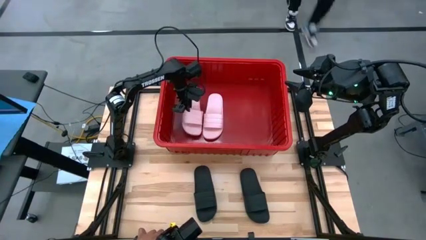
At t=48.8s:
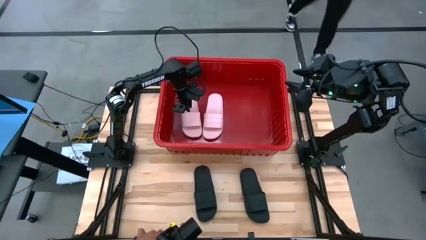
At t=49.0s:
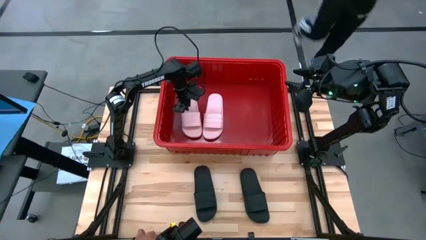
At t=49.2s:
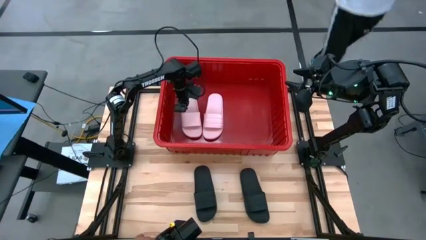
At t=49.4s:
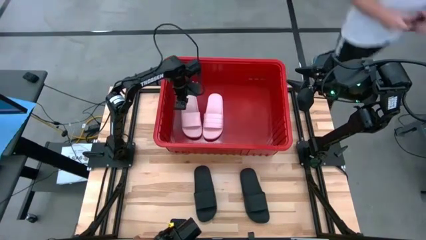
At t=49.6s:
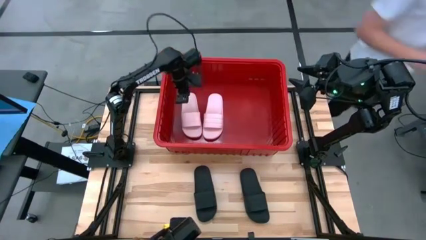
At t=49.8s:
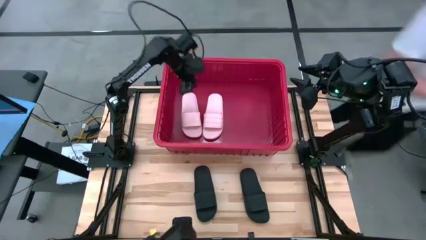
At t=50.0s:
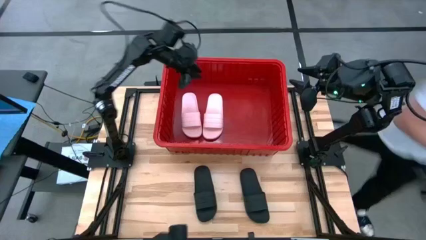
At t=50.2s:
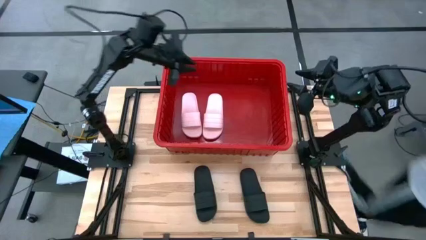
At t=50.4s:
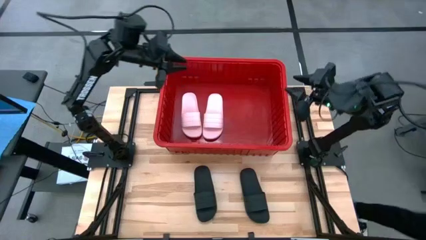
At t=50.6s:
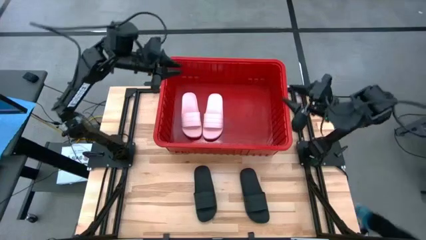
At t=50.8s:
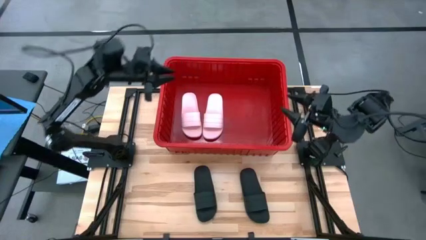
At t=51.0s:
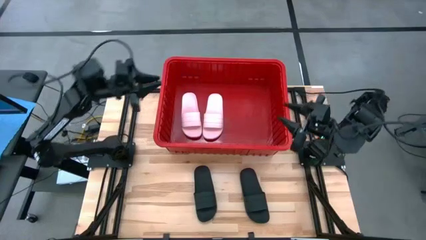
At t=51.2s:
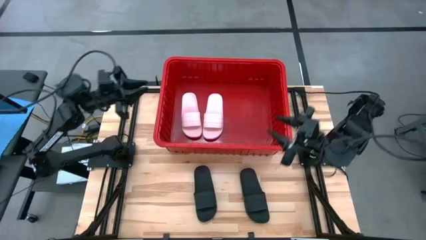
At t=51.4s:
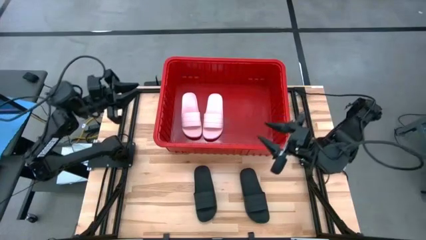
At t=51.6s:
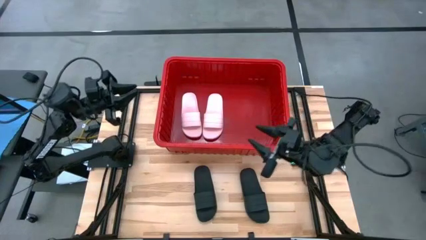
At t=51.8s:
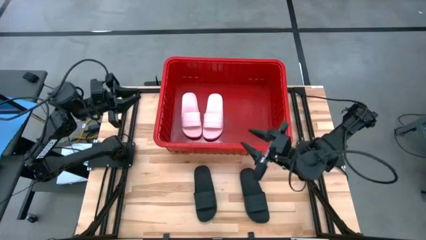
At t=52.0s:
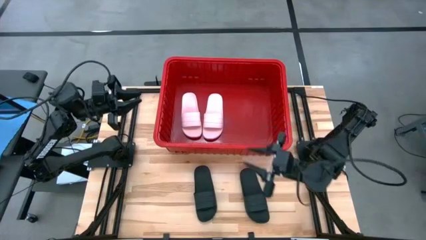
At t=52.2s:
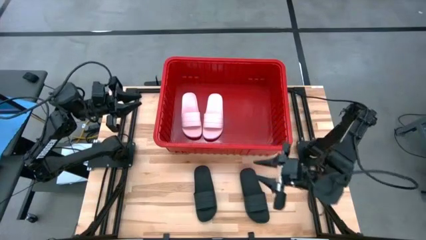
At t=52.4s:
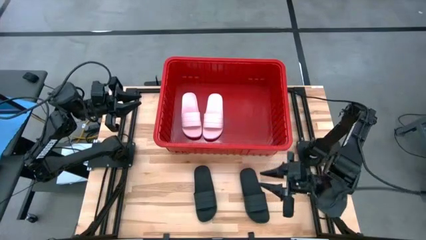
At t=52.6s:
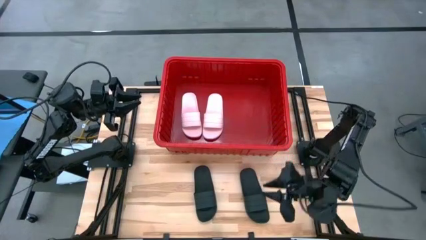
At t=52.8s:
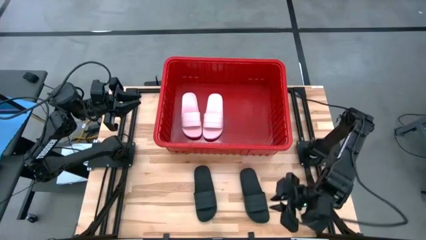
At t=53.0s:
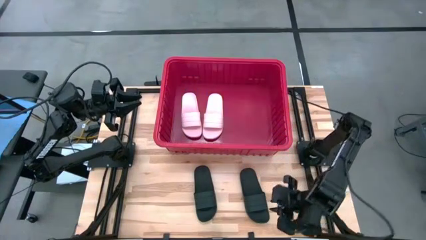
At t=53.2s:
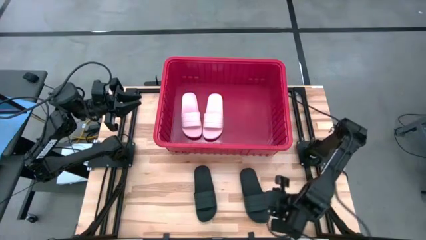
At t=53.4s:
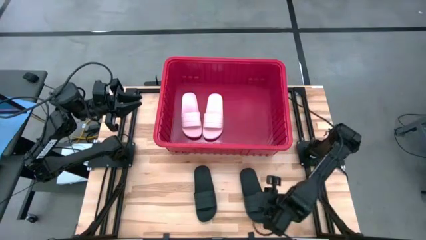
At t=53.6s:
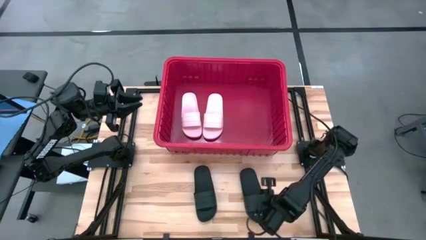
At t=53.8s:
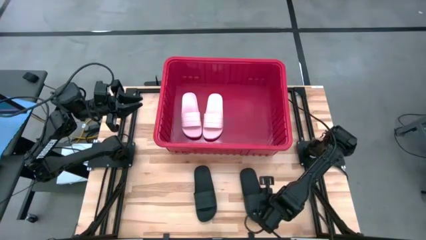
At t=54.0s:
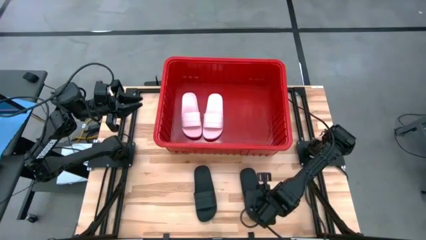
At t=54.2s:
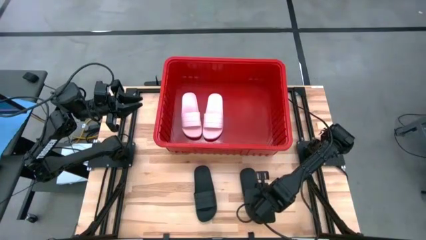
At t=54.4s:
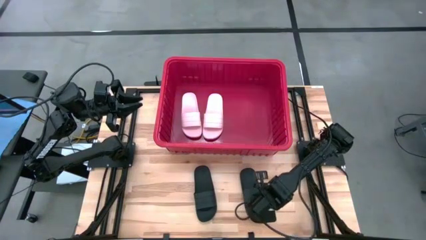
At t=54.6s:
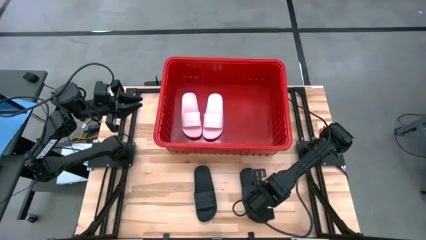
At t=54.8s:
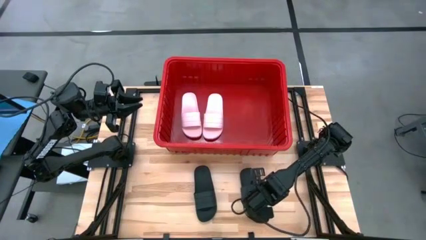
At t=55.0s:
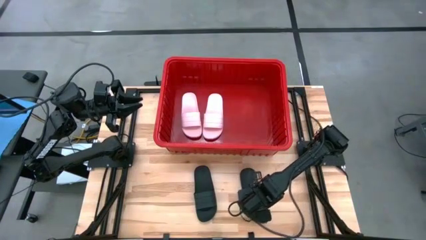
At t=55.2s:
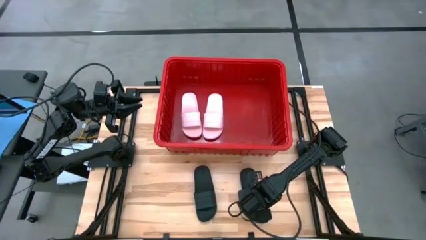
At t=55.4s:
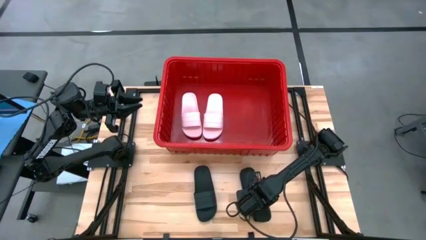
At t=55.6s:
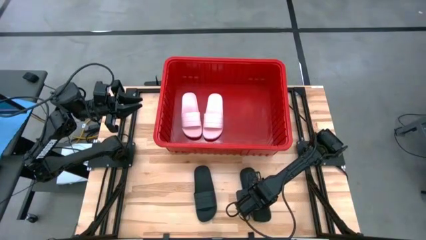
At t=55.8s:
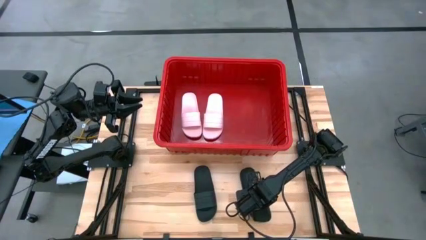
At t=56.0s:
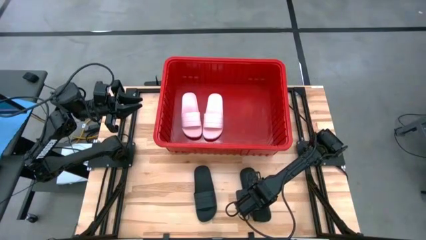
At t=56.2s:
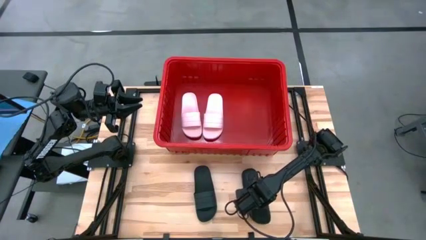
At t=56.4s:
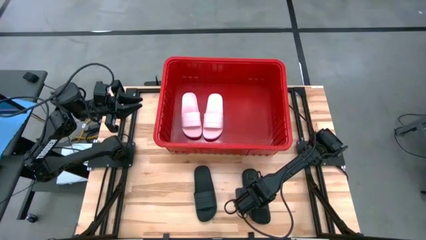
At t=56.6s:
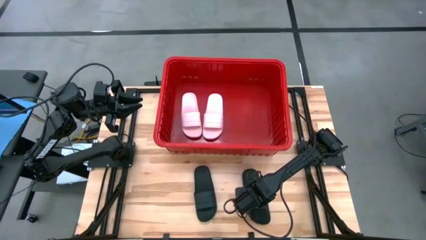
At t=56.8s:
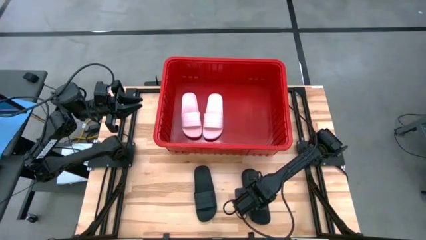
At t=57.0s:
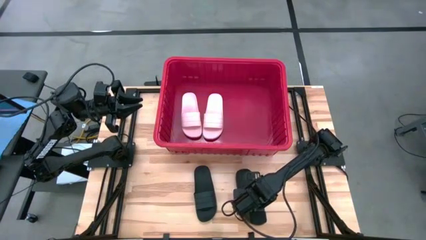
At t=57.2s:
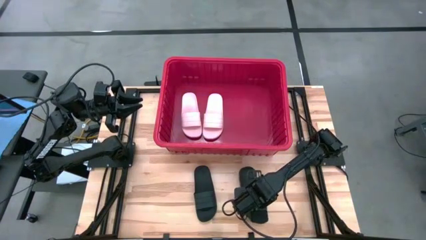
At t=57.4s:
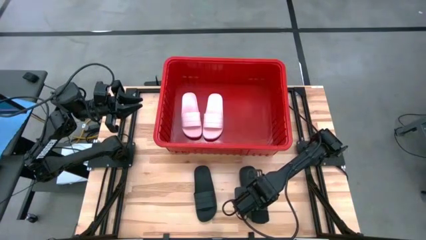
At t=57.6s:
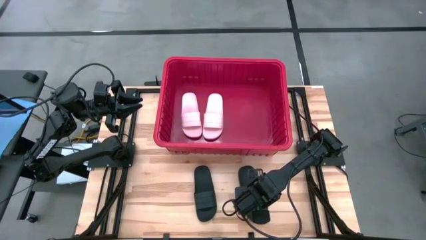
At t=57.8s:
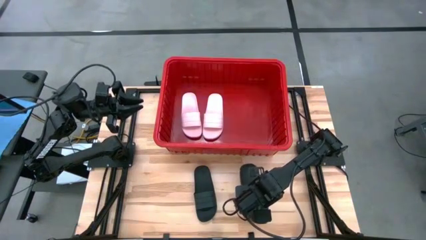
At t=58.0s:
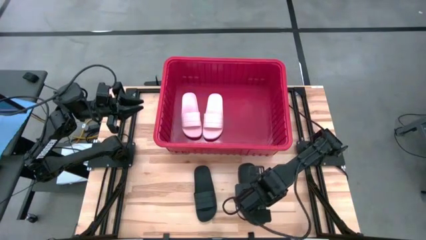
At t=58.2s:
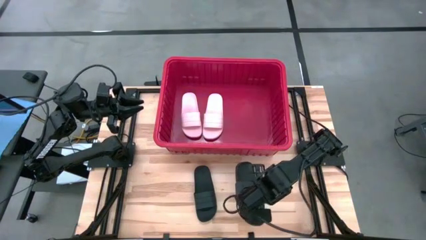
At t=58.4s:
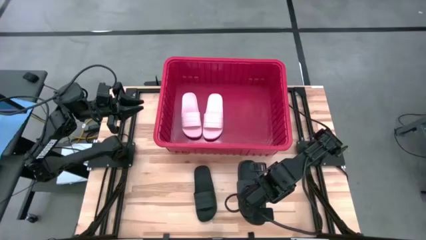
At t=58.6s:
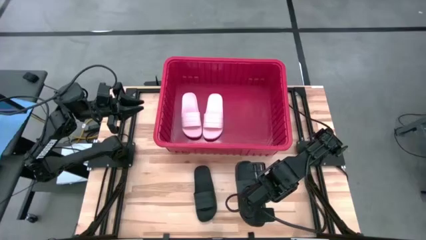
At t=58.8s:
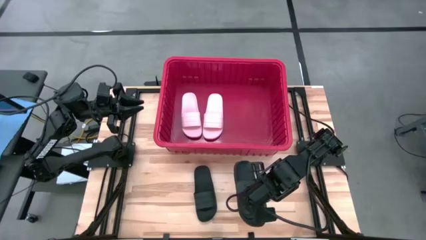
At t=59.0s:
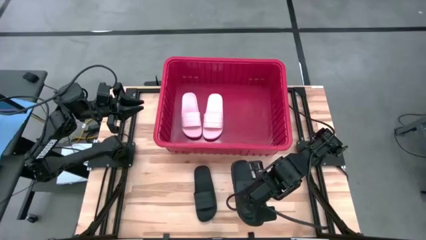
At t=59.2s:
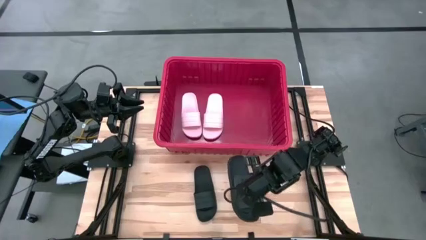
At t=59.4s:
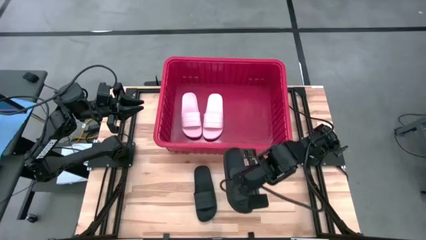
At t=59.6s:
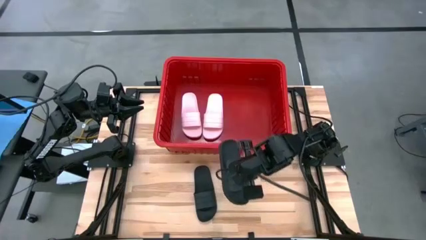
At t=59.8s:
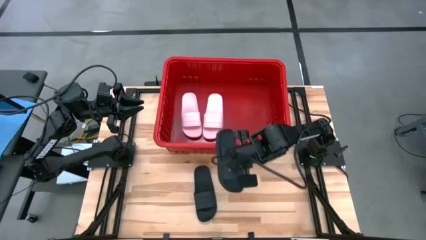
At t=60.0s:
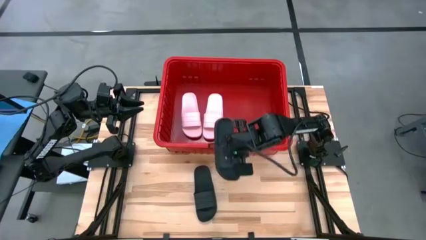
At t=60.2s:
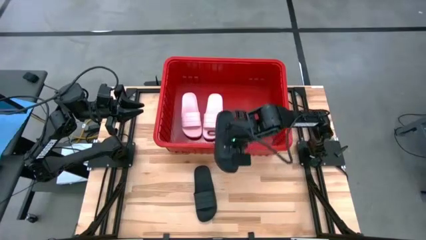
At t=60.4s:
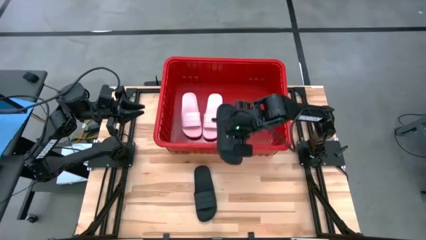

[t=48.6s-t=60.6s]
Task: Pick and place slides into bin
Put the right black slide into the red container
